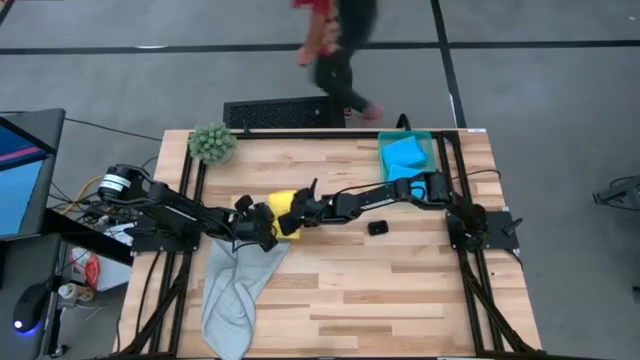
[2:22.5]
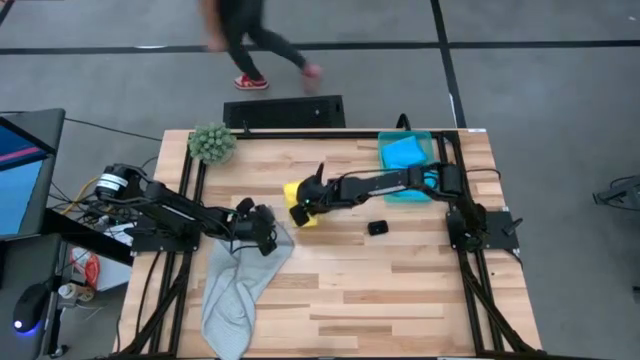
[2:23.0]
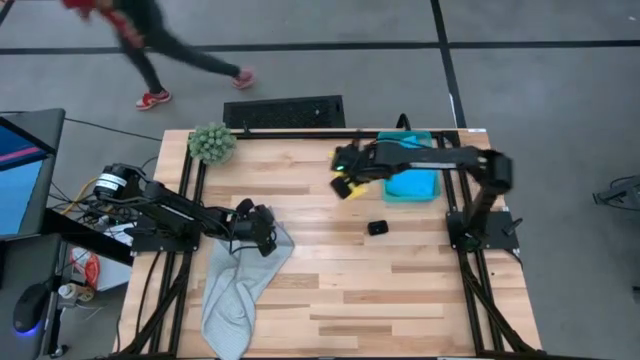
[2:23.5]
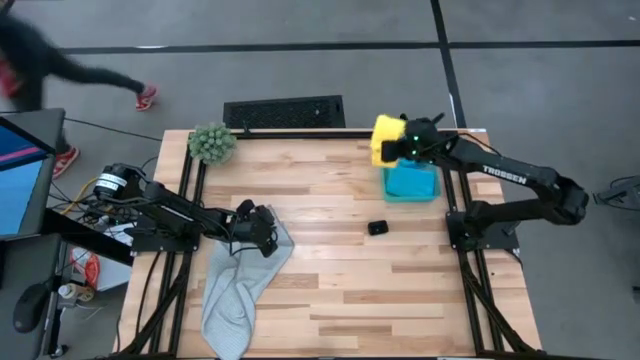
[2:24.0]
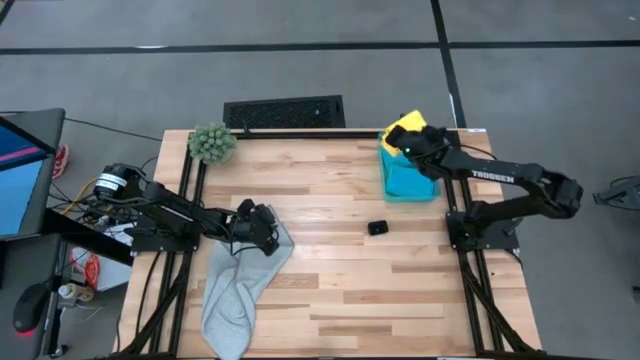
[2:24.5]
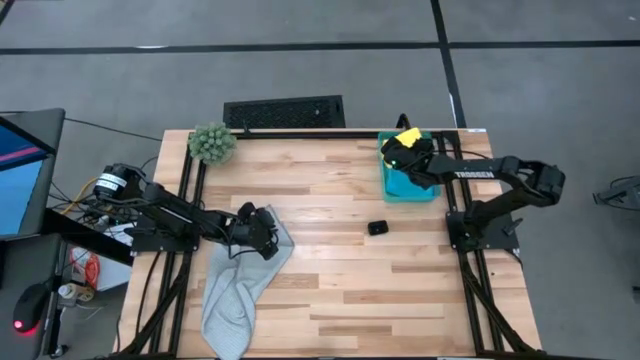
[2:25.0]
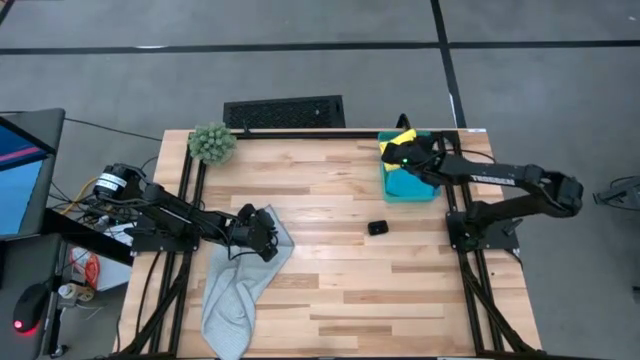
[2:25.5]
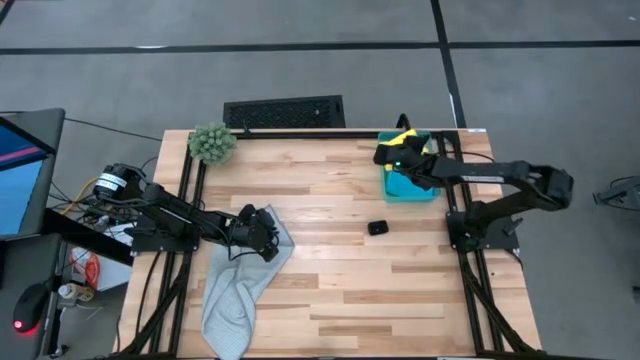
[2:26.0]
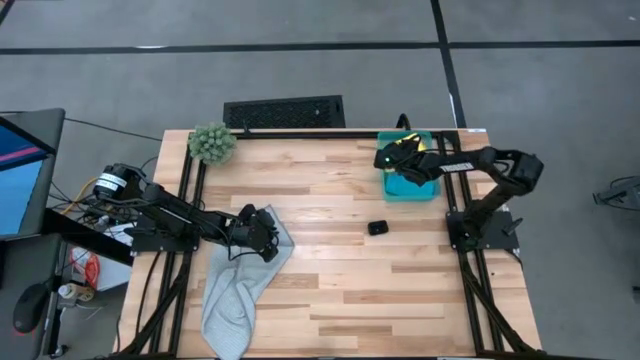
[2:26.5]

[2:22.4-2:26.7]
Task: Fold microfiber towels
Stack the folded yellow microfiber cloth on top of the blue microfiber cloth in the bin

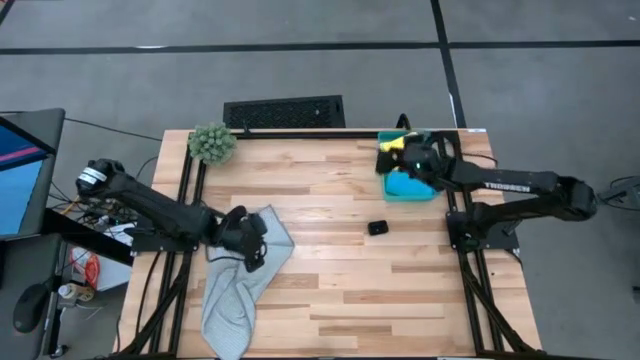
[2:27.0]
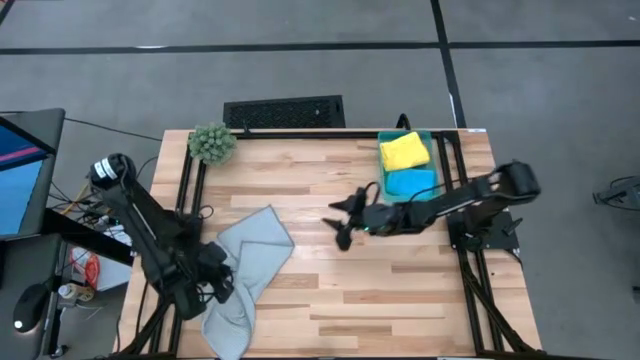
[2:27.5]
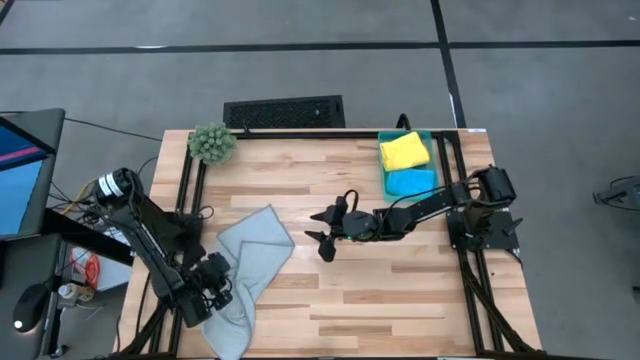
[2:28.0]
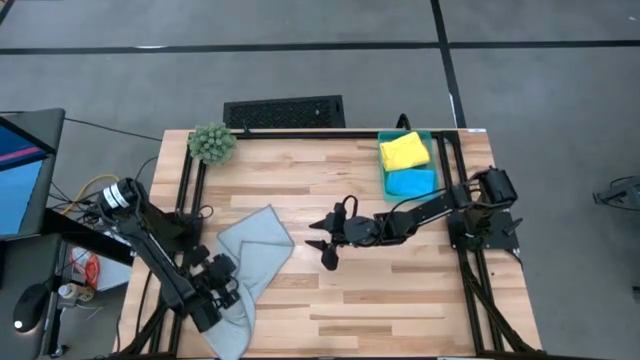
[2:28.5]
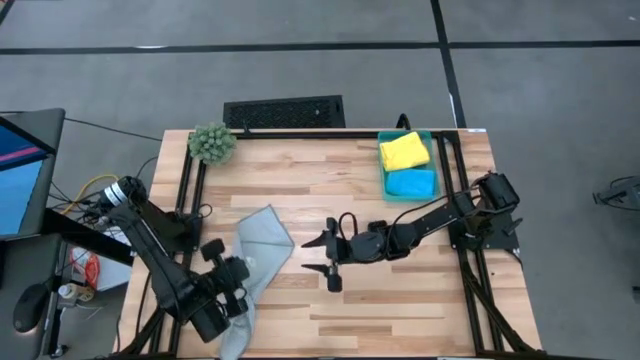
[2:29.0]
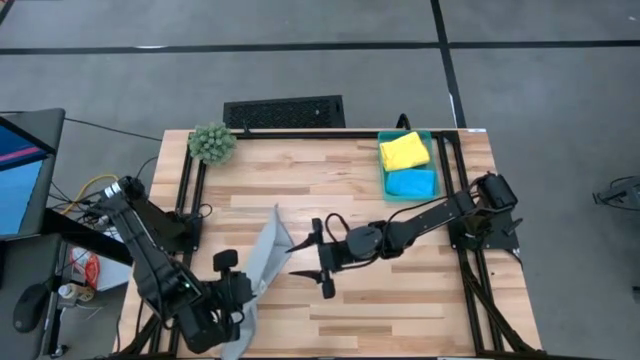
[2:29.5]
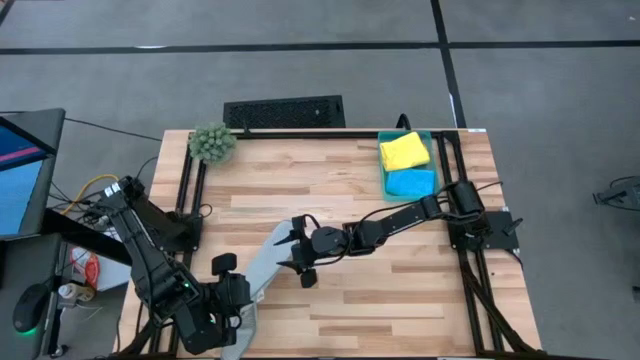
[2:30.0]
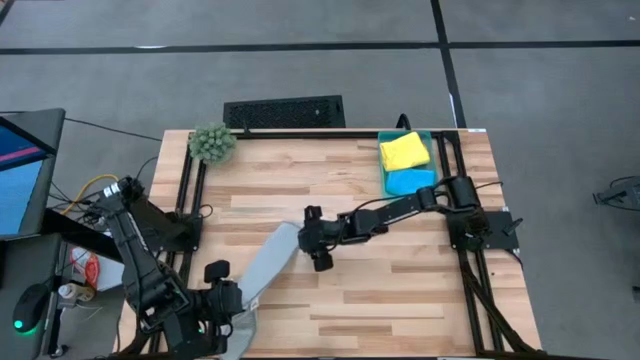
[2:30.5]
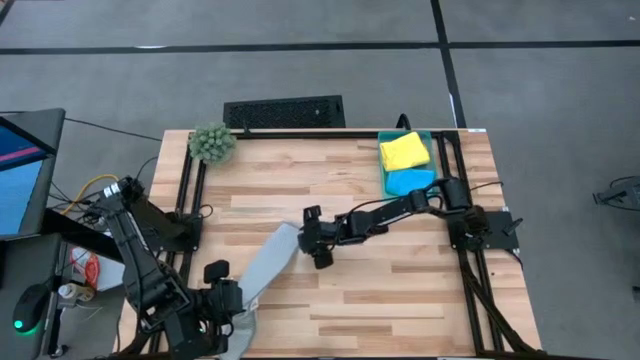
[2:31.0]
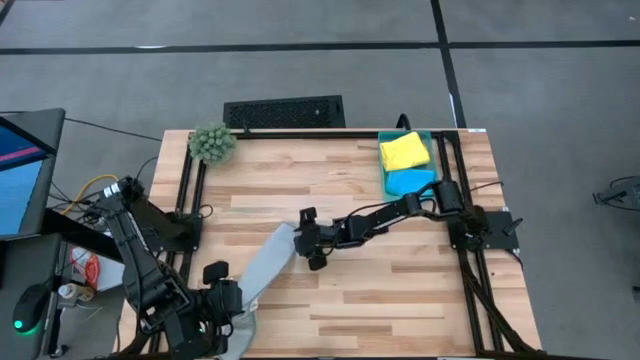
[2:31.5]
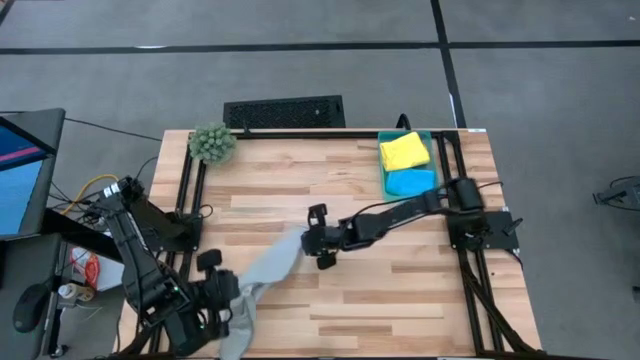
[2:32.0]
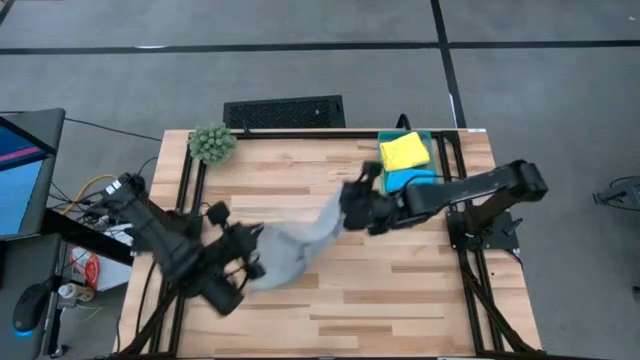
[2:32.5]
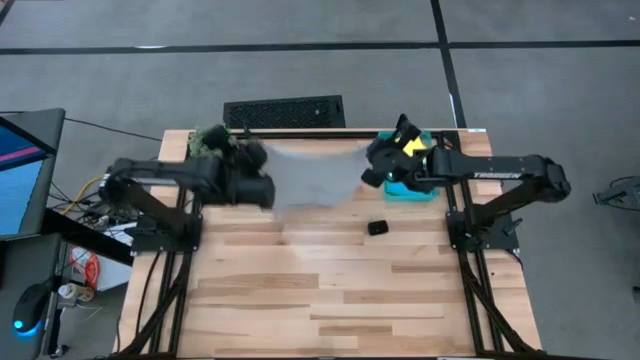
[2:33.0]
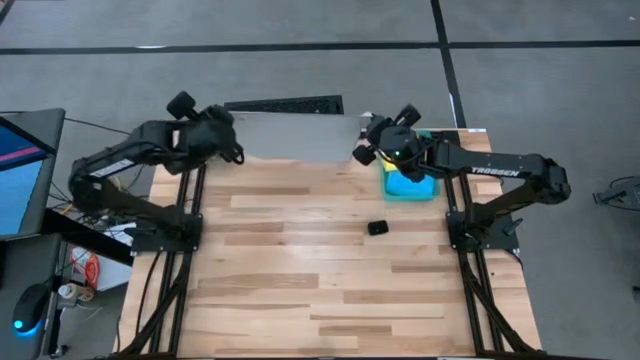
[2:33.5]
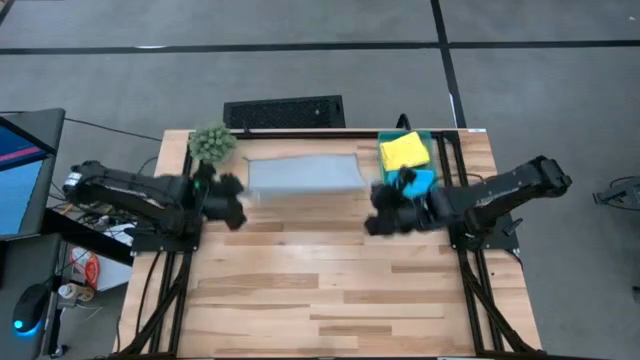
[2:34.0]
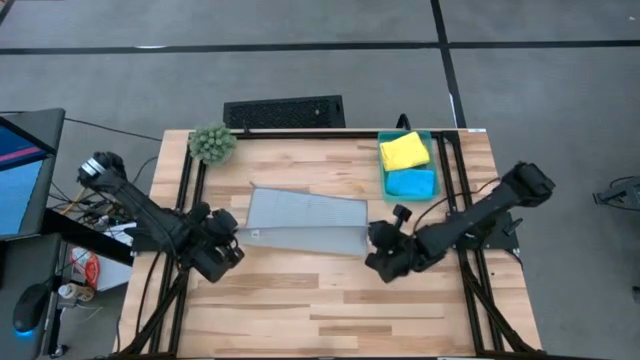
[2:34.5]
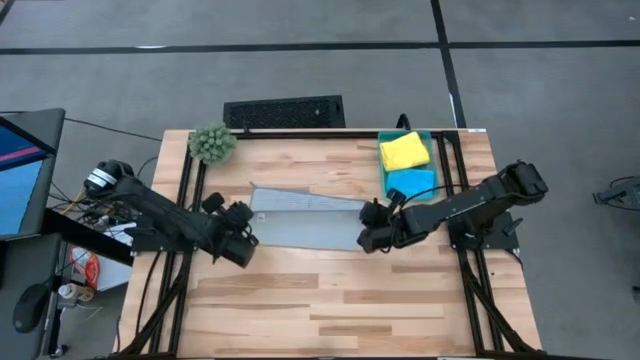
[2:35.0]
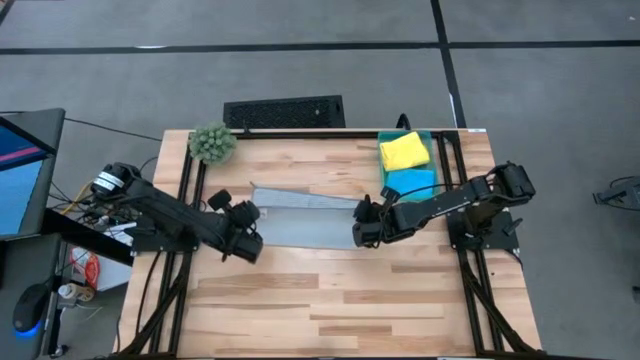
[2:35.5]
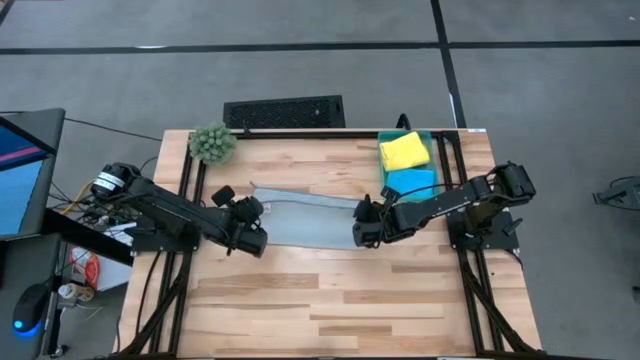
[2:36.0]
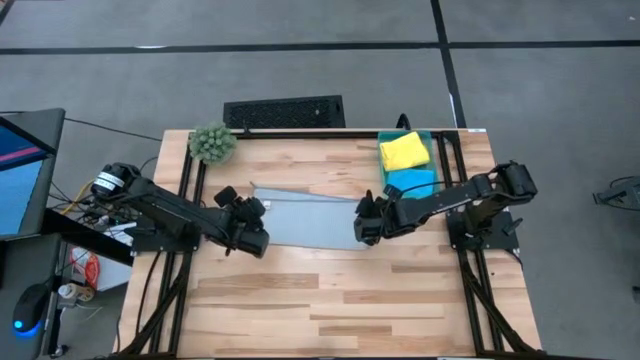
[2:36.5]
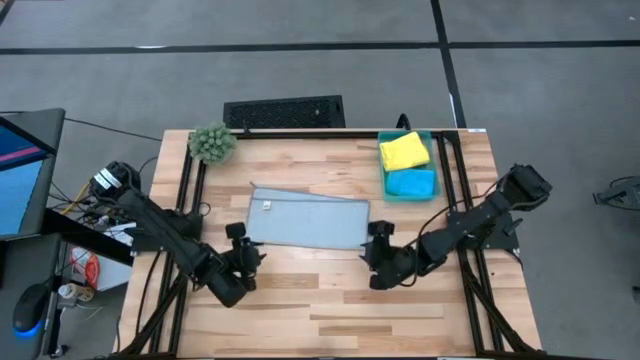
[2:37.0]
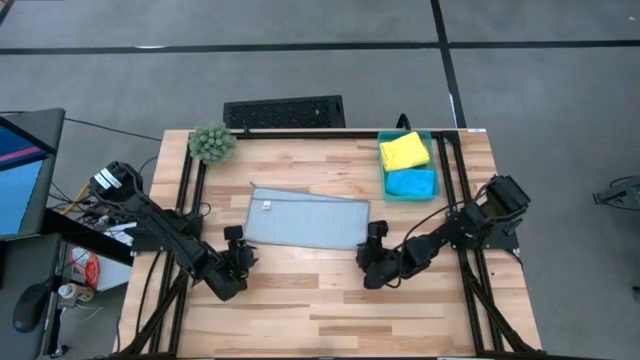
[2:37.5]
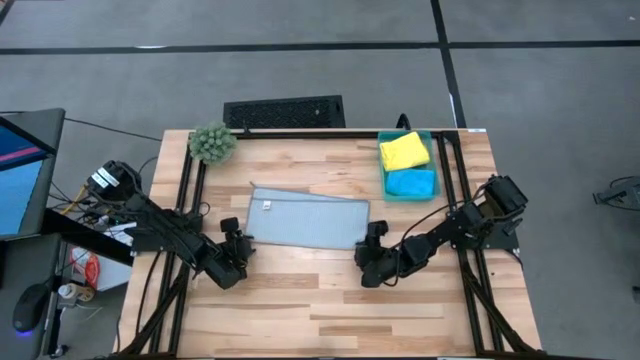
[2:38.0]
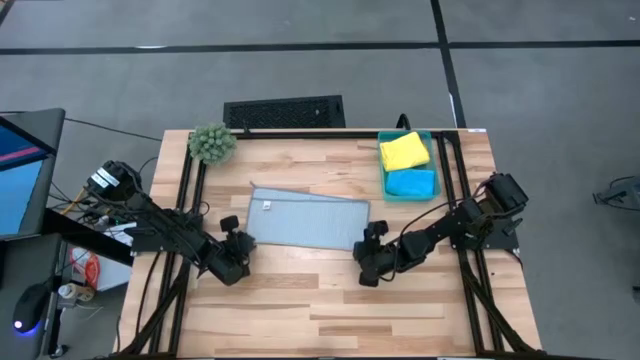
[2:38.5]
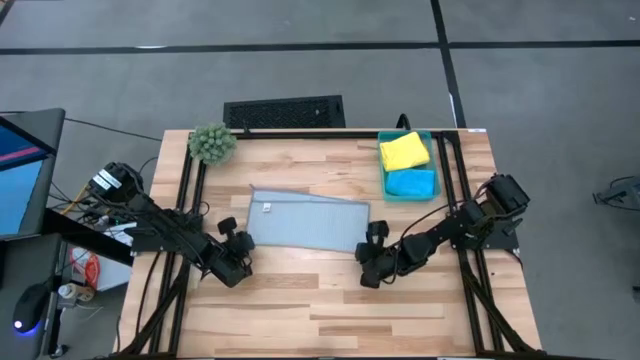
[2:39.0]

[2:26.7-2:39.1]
Fold the gray microfiber cloth

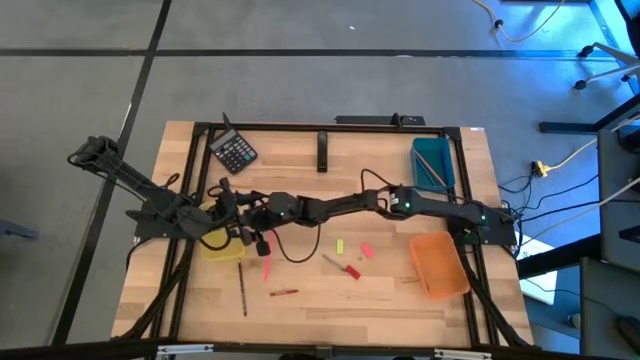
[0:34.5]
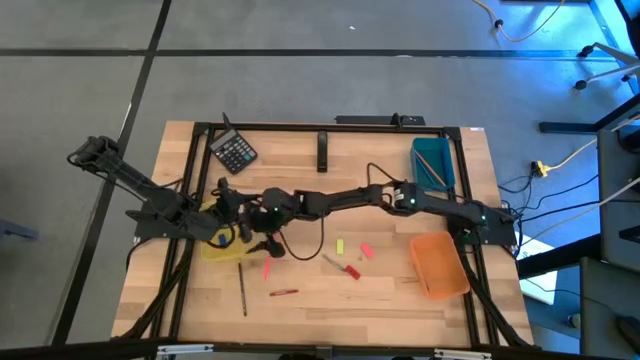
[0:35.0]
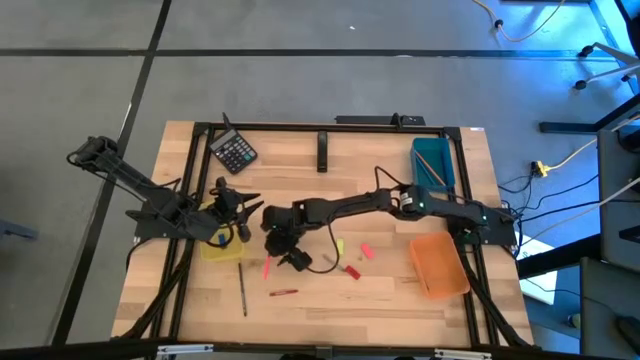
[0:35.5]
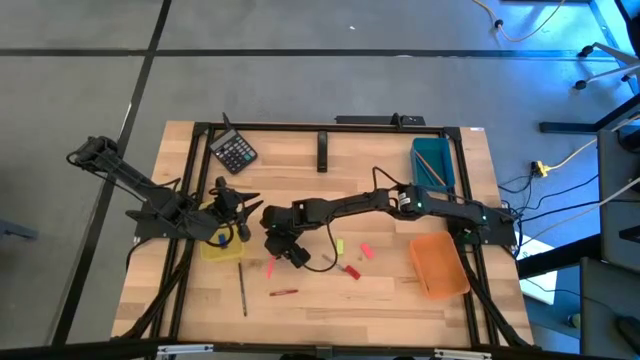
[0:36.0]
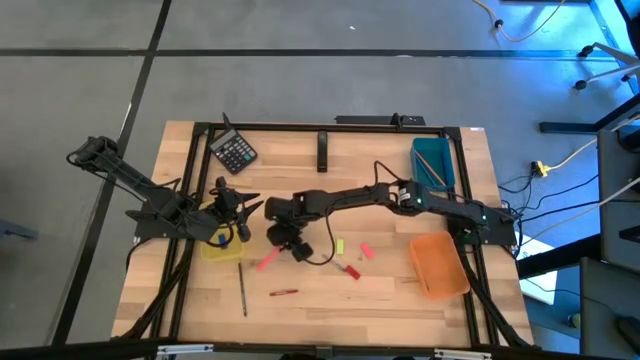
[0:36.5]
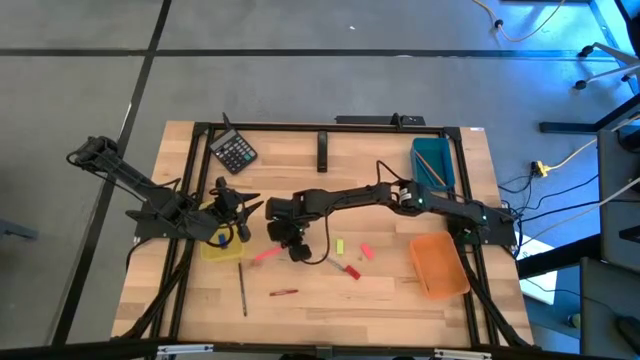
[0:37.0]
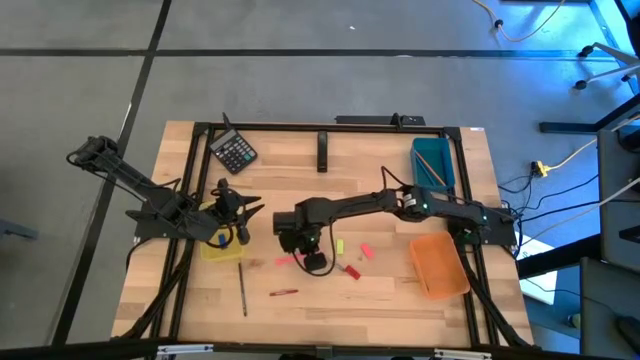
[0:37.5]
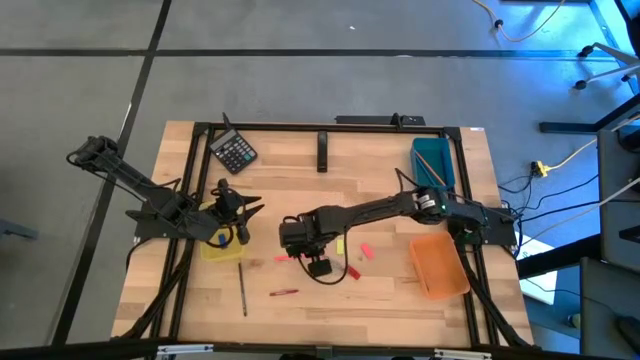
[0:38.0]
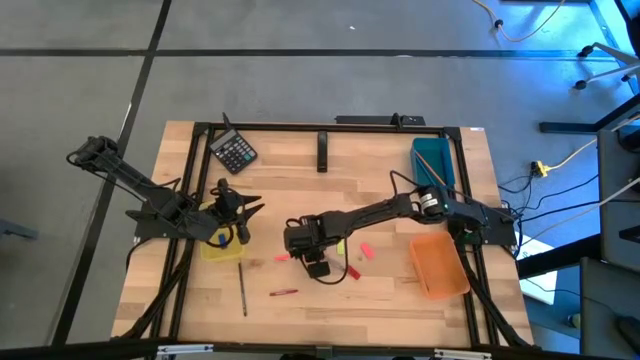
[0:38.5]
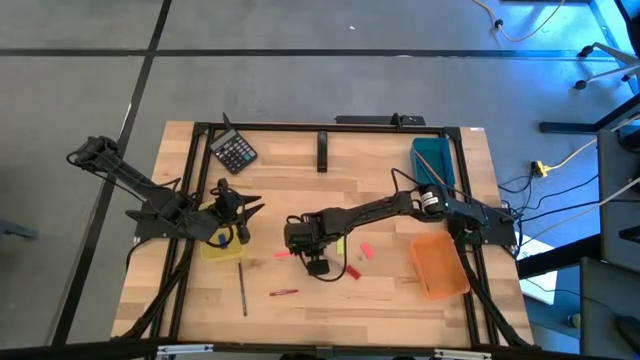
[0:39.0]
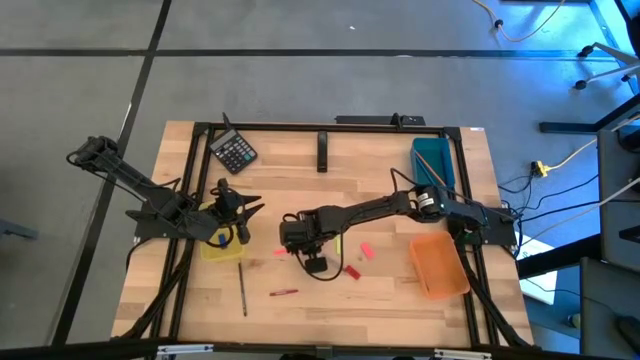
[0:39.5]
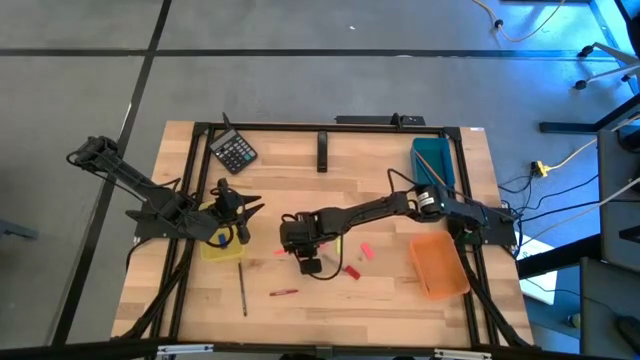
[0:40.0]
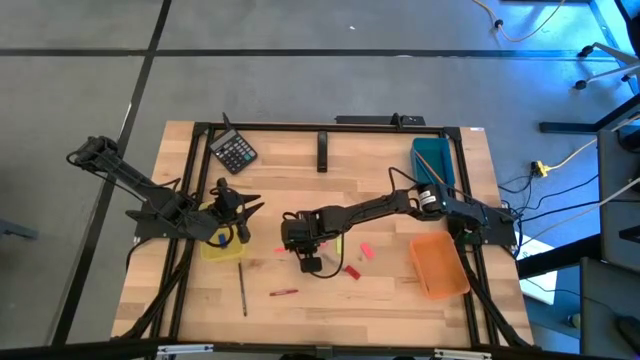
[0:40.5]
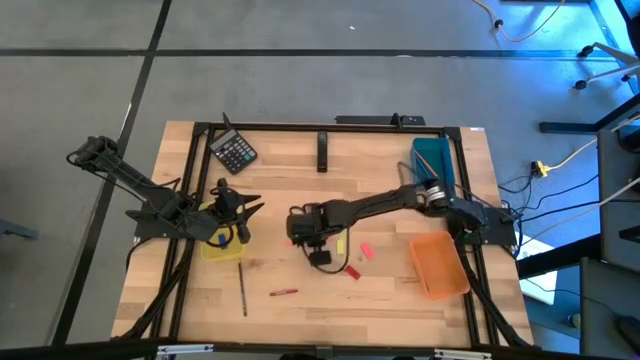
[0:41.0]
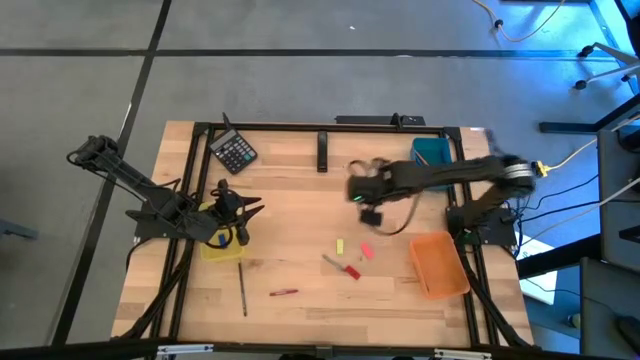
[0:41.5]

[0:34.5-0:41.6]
Task: Sort crayons/erasers/pens/pencils in bins
Put the pink pencil into the blue bin
